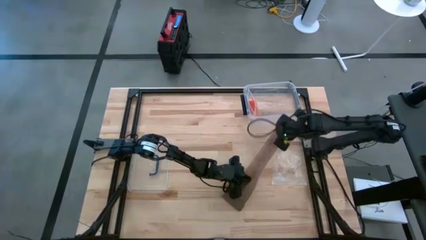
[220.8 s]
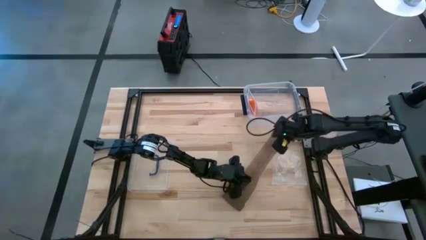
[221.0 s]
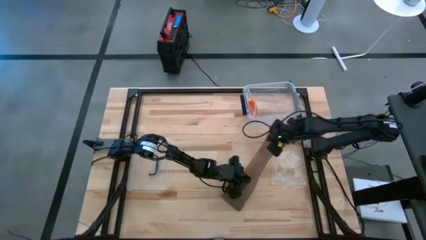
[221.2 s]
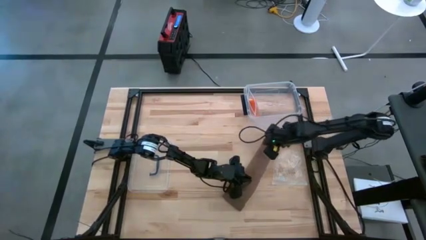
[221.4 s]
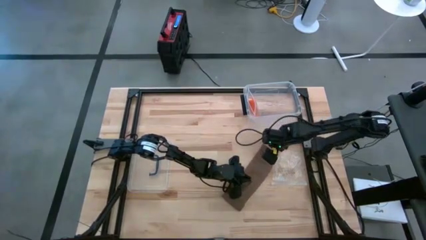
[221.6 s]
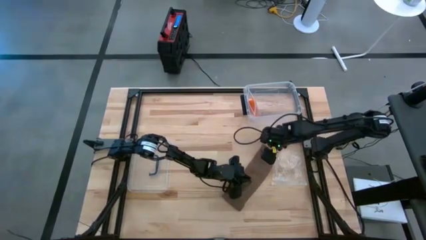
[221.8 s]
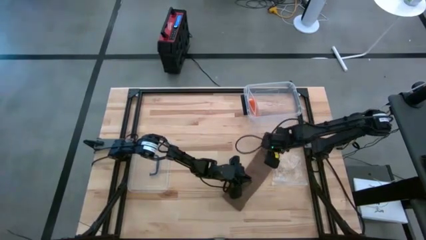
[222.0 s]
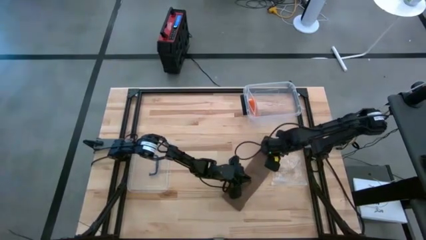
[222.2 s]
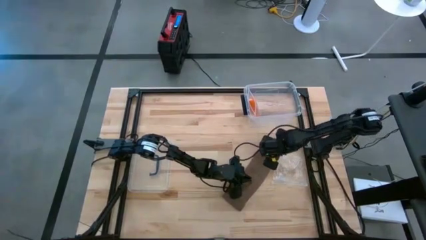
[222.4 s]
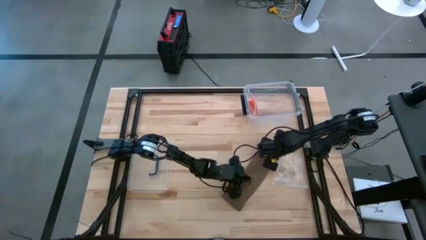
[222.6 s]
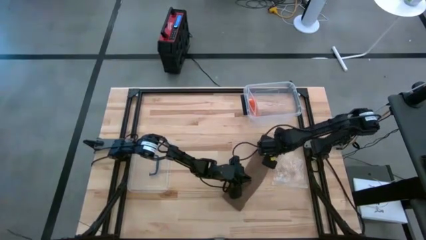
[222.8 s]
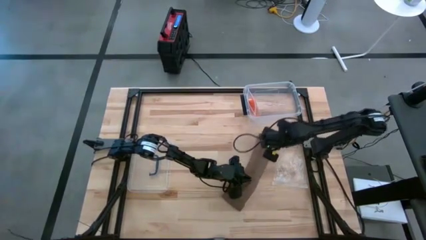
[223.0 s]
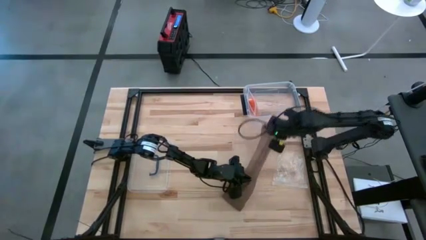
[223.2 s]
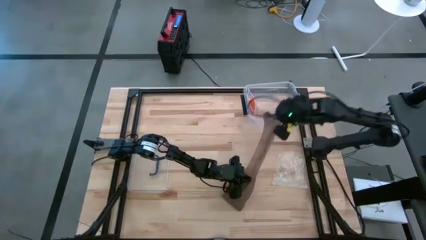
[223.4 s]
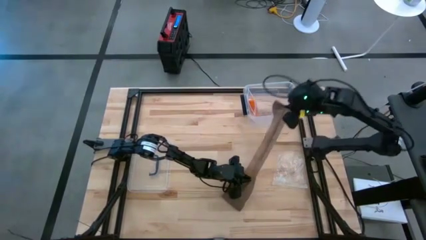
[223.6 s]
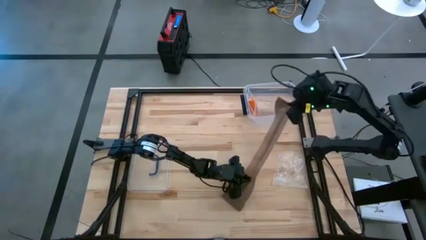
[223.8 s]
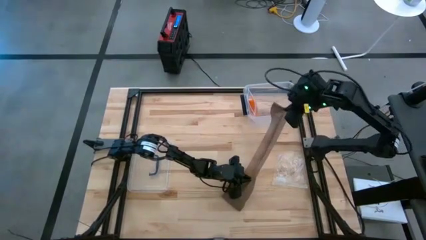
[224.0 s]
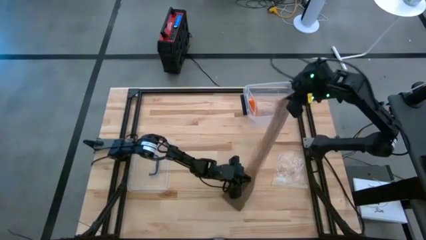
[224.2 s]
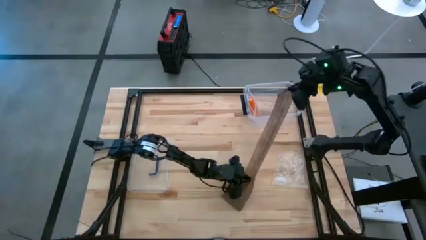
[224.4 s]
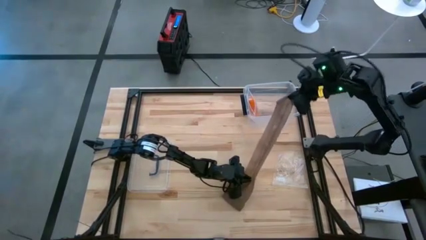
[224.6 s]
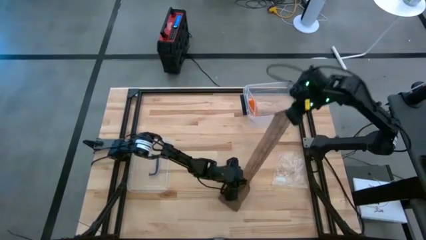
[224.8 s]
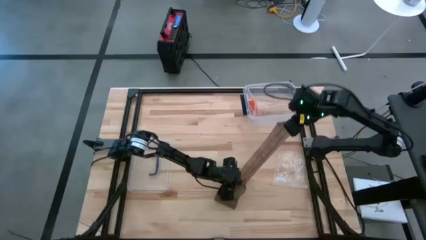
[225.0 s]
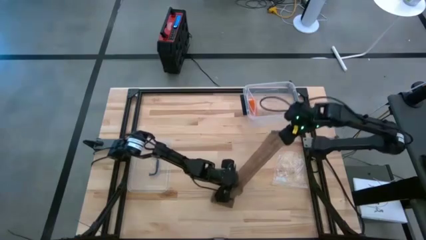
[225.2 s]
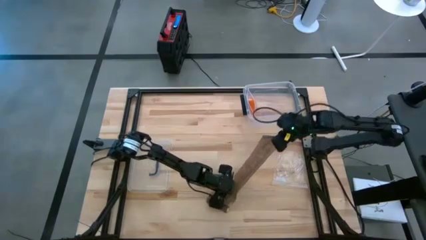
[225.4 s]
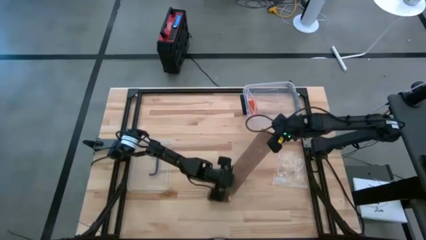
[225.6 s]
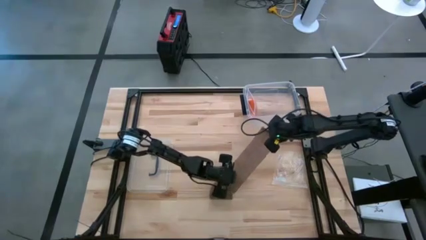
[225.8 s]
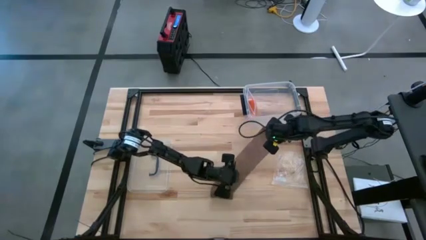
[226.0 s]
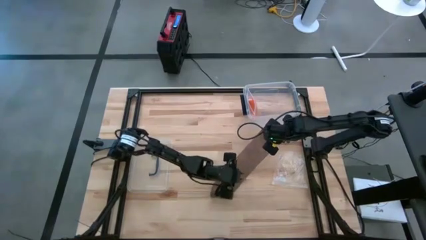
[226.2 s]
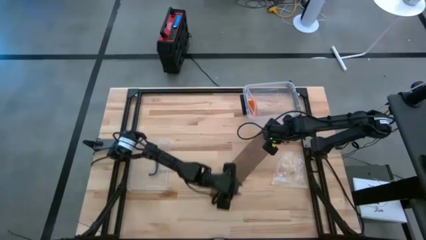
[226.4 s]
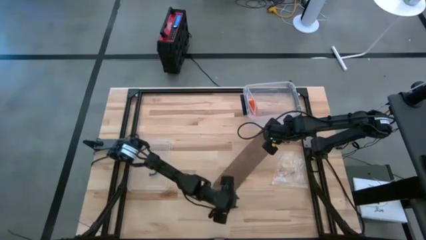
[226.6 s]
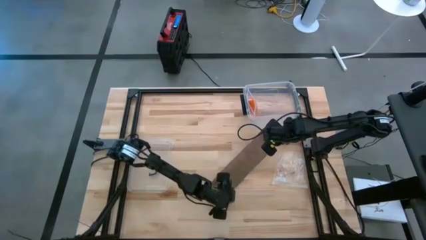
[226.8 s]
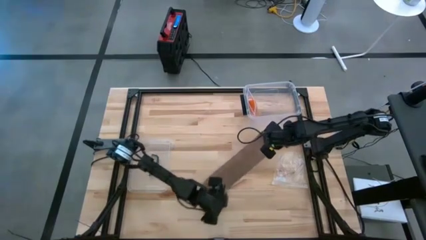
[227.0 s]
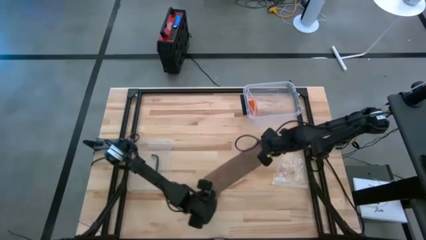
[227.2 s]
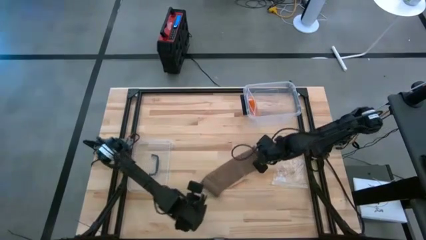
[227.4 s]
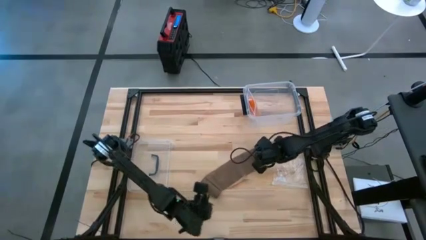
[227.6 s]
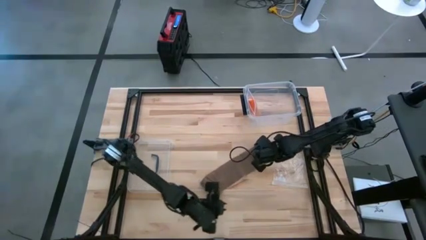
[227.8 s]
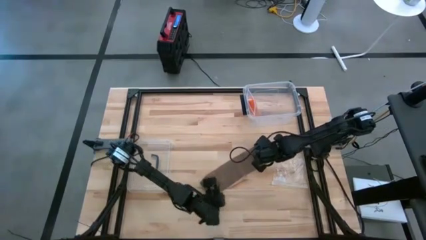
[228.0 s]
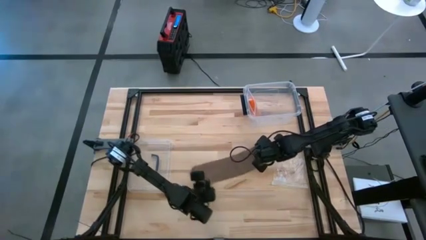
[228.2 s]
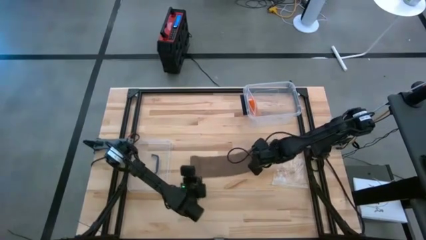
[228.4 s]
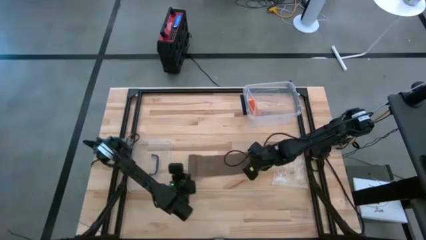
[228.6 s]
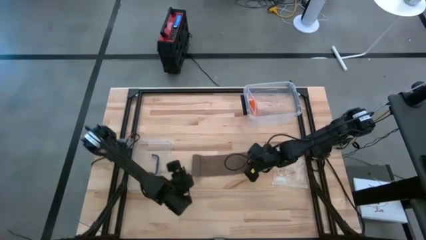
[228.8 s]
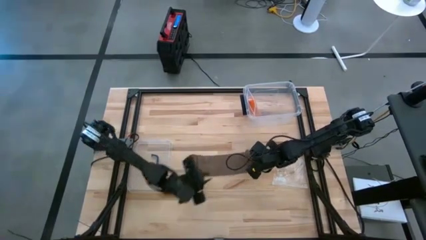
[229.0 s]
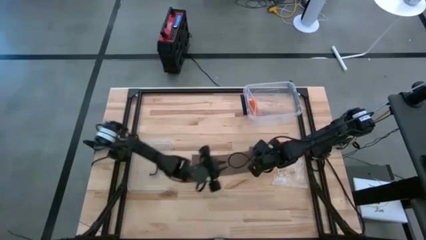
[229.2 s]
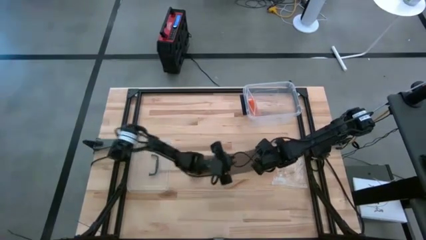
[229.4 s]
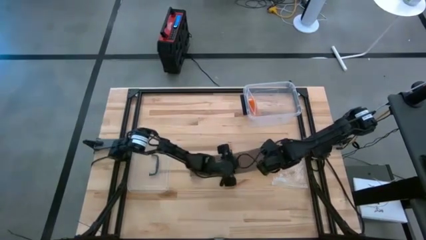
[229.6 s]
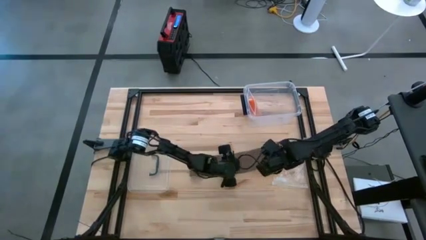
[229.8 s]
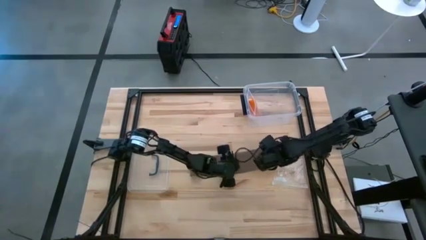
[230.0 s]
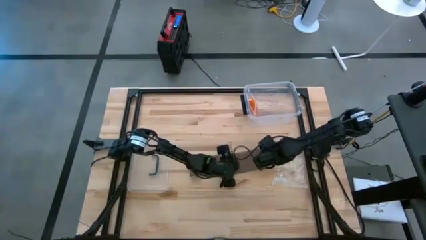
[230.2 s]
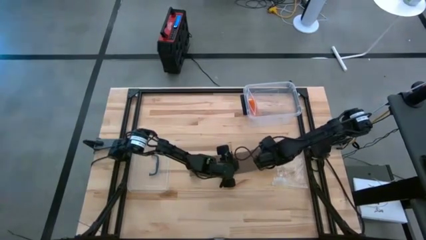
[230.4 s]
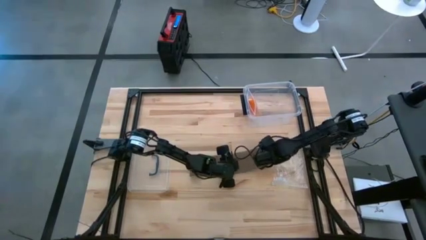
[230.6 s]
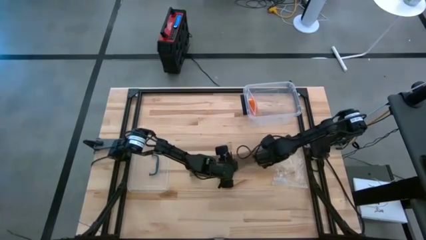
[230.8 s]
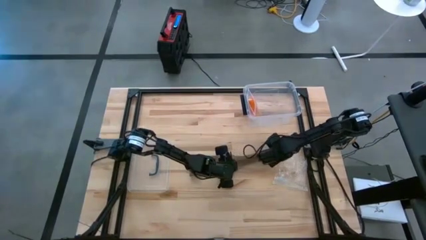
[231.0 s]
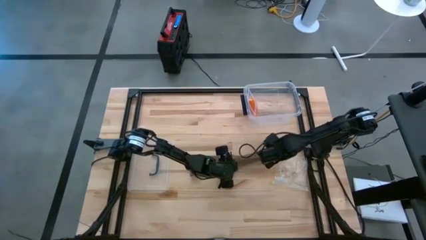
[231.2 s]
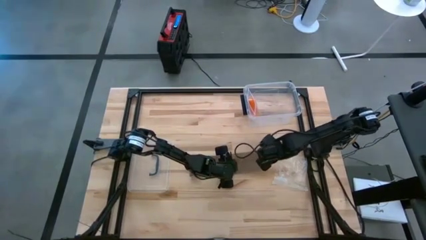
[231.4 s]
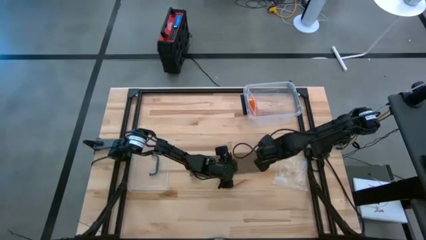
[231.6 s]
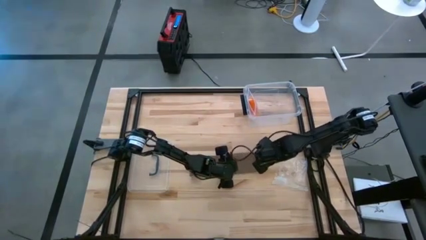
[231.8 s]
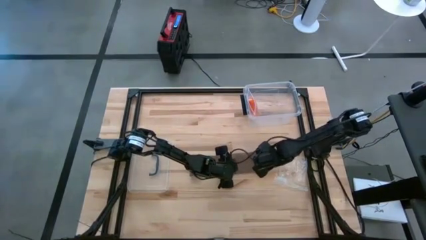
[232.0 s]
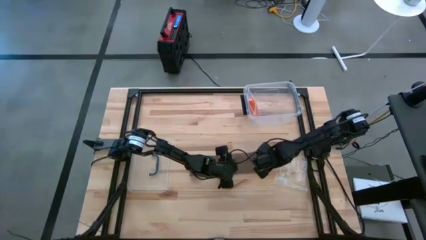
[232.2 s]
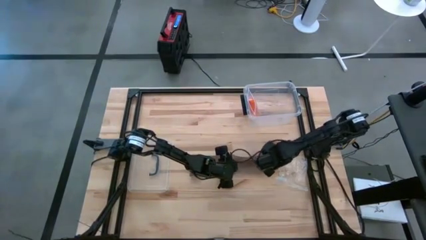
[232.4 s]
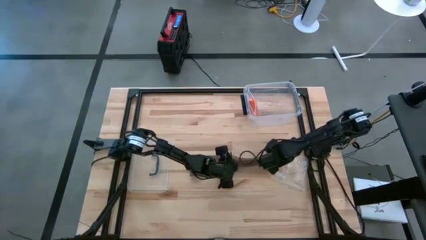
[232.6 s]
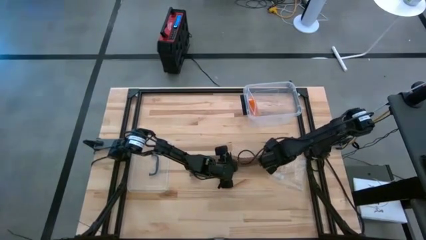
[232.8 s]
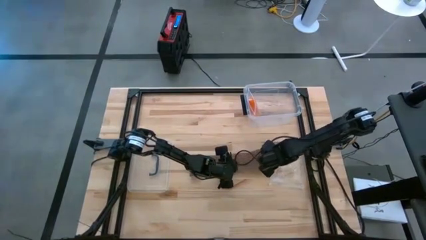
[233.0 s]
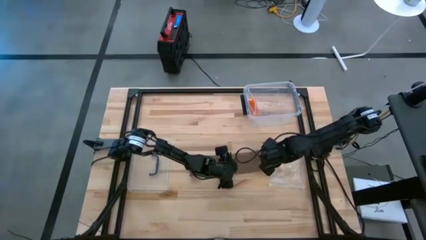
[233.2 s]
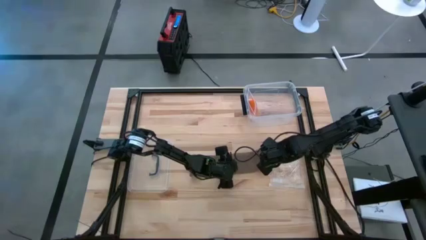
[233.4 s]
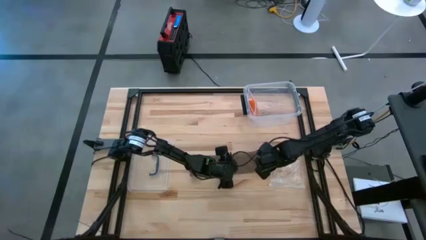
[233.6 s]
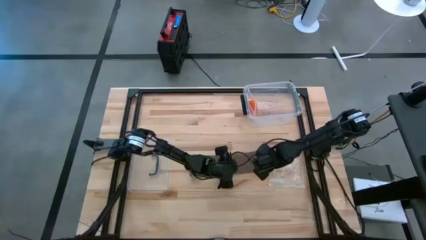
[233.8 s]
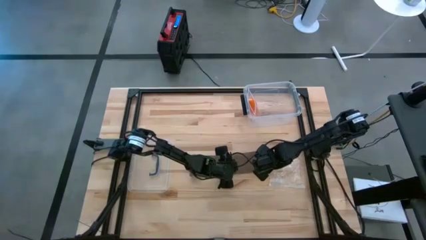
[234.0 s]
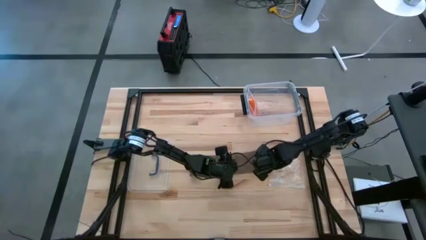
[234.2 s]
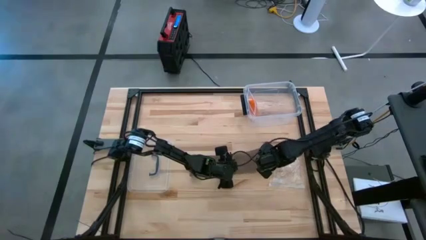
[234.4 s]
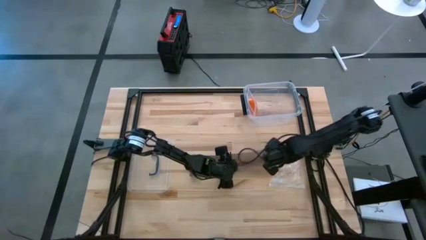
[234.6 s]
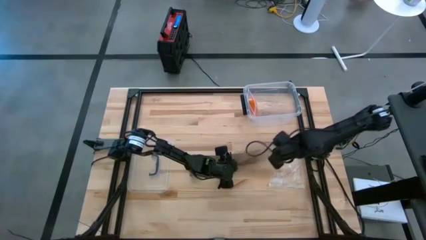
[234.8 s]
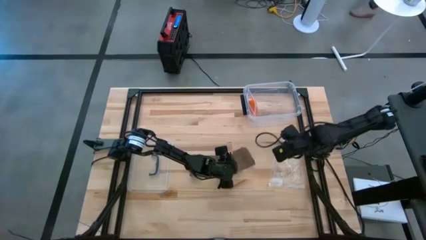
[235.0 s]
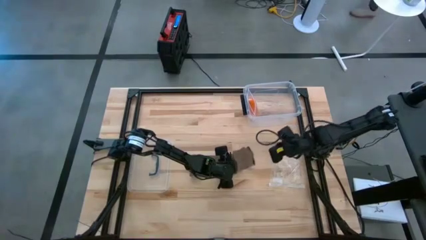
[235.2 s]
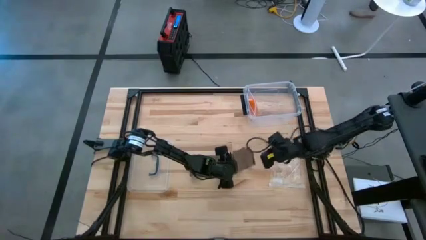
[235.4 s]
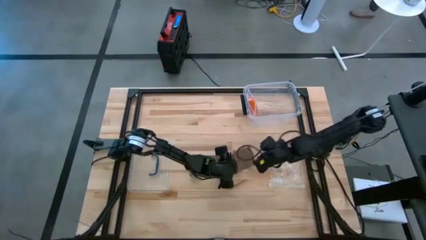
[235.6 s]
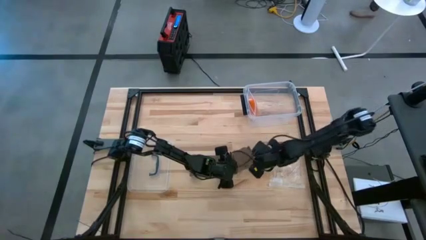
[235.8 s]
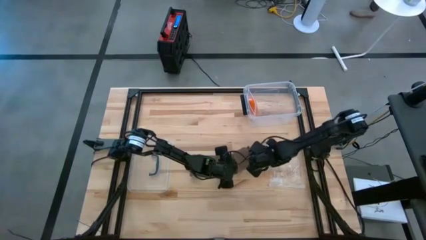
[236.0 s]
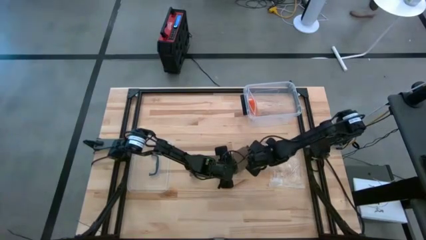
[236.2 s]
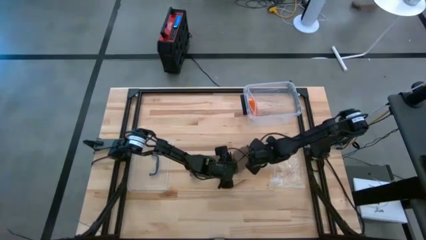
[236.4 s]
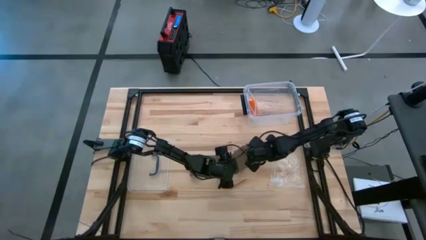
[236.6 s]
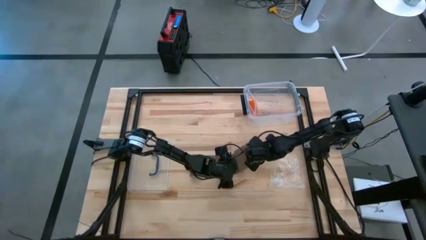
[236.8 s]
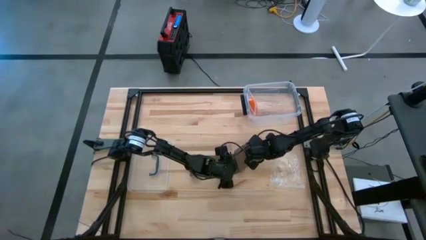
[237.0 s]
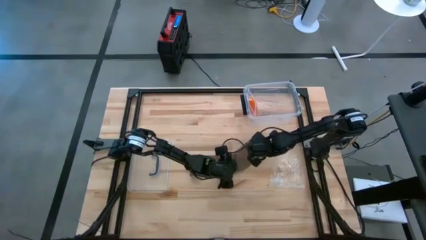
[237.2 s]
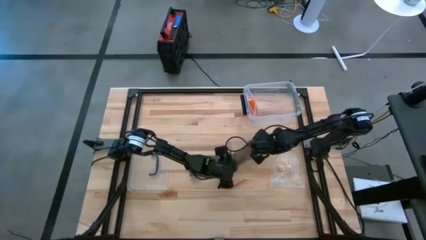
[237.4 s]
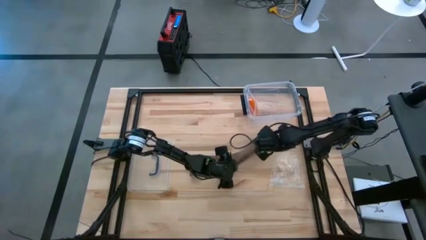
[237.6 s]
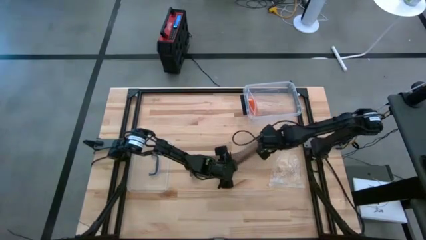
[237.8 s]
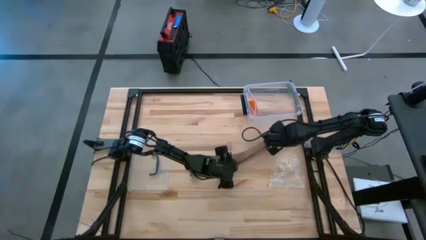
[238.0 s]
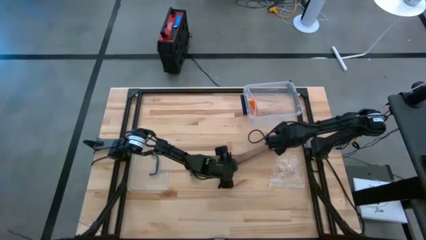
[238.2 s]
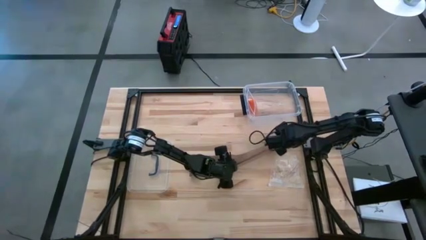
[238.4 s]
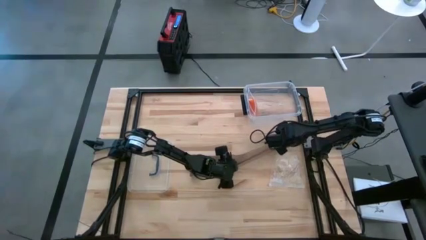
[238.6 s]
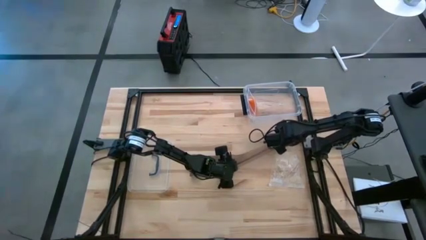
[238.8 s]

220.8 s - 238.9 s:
Task: Roll bandage
Roll the brown bandage
